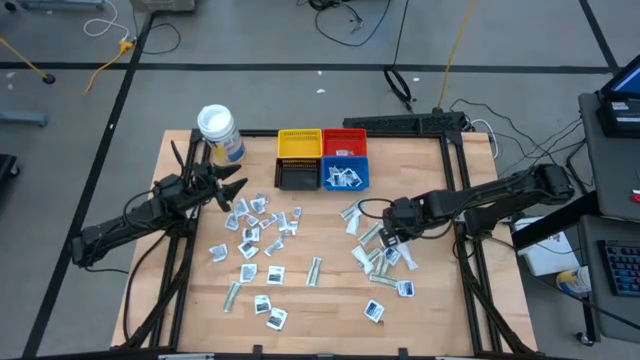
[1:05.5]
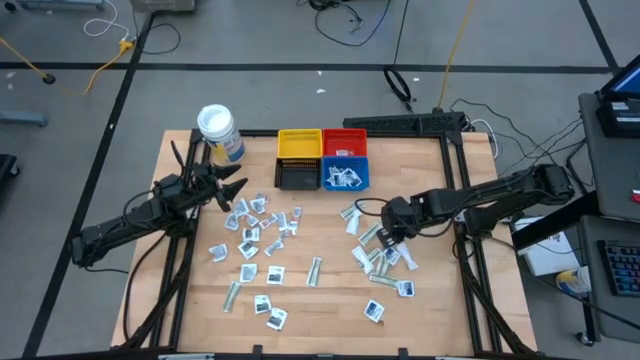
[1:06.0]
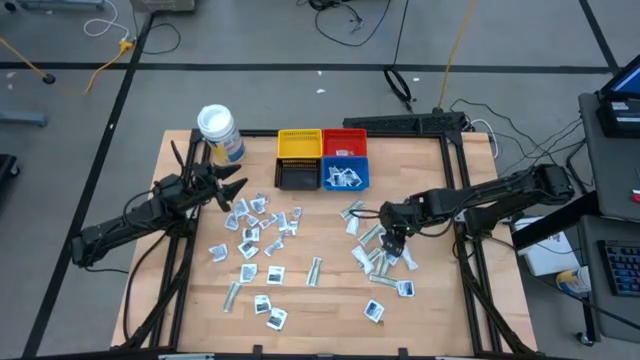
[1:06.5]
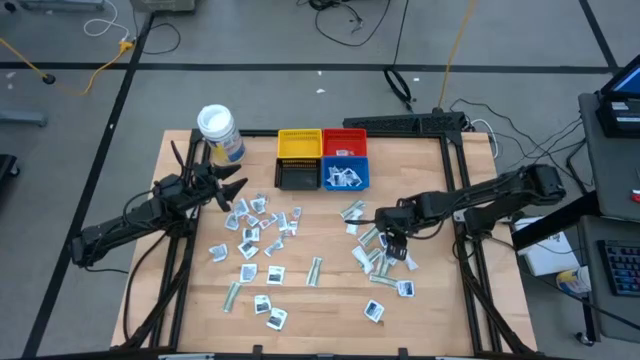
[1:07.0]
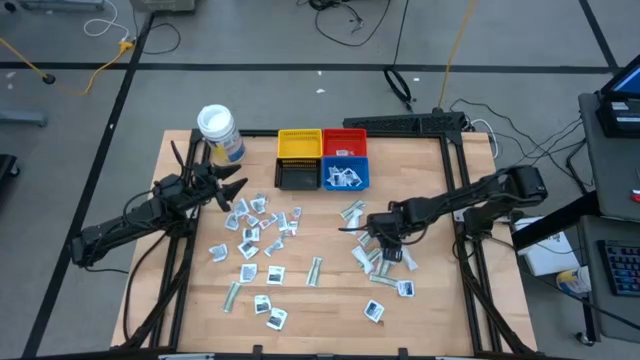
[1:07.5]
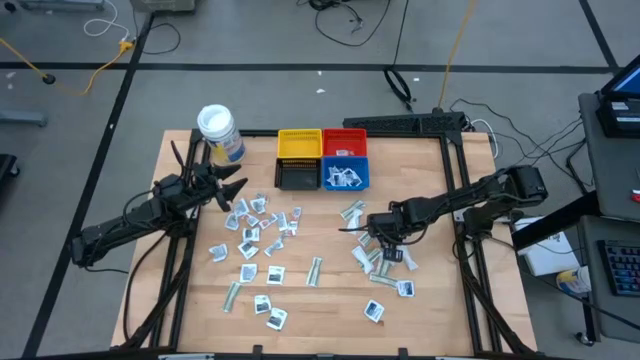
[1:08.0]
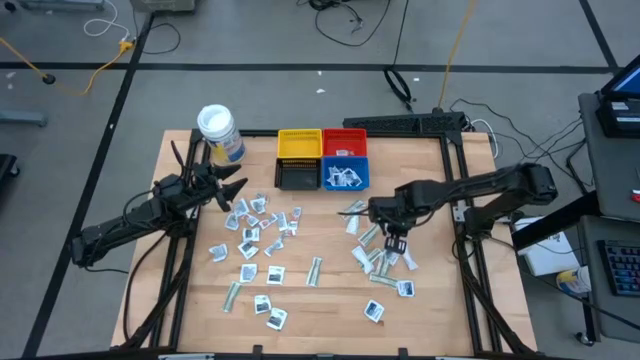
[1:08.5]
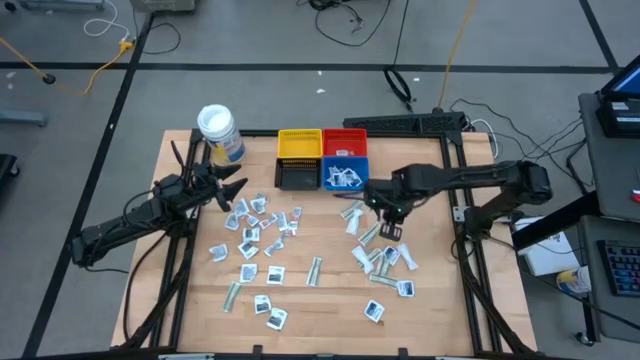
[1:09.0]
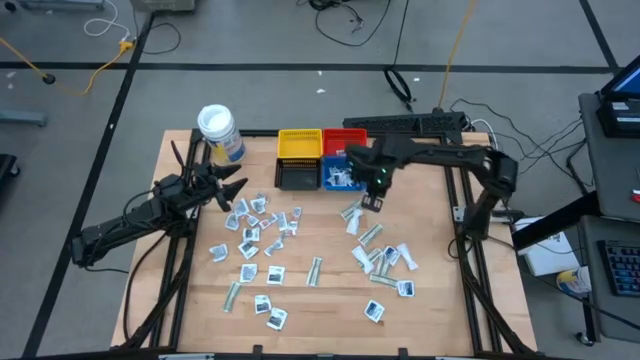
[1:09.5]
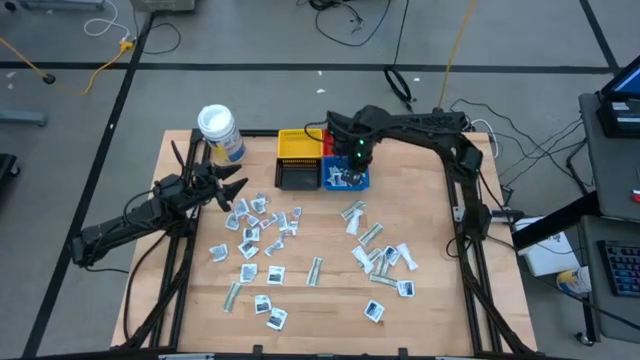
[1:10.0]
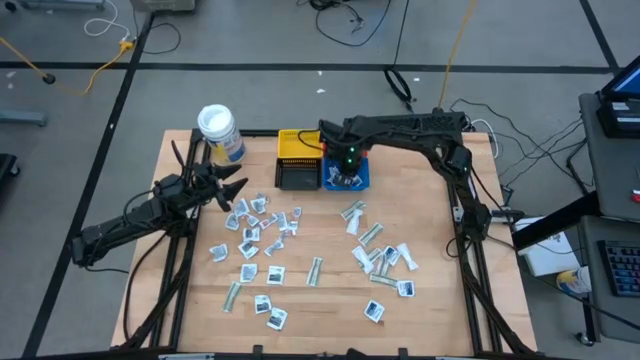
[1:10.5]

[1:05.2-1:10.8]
Task: Pick & Place First Aid Supplies
Put the blue alcohol pad into the blue basket

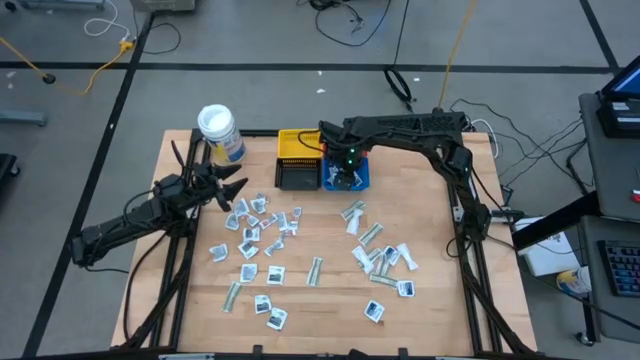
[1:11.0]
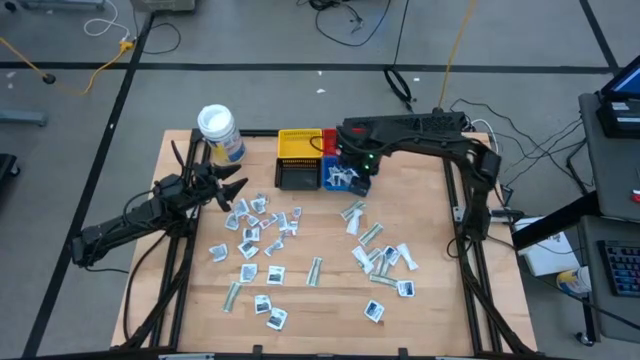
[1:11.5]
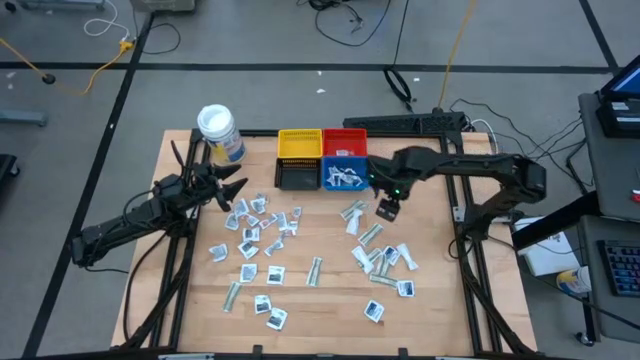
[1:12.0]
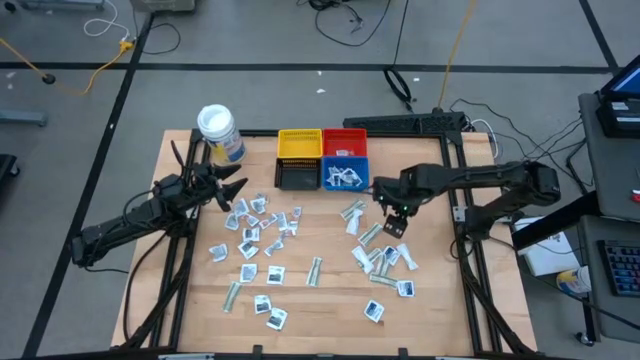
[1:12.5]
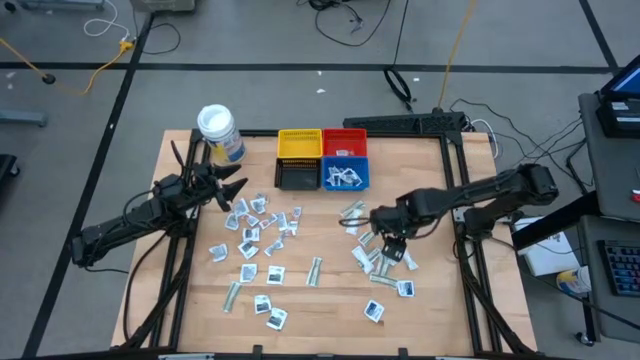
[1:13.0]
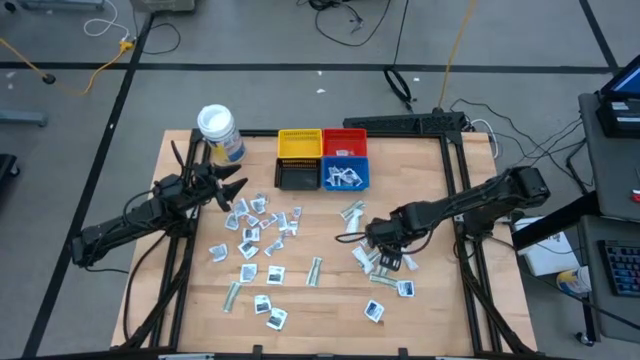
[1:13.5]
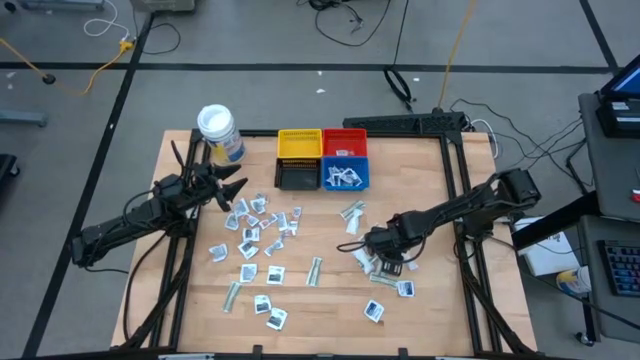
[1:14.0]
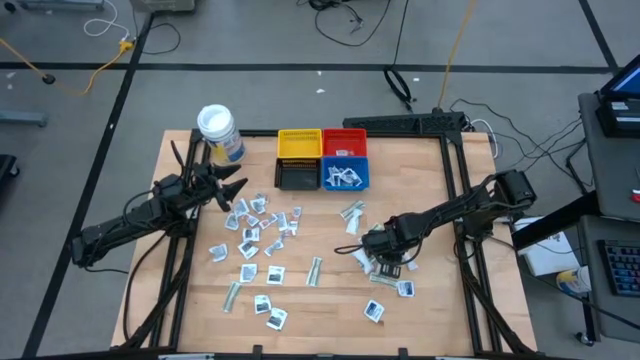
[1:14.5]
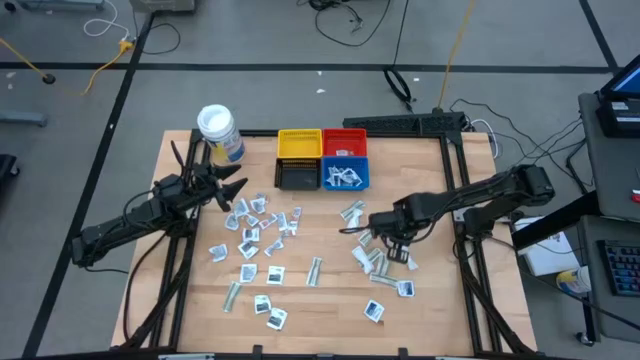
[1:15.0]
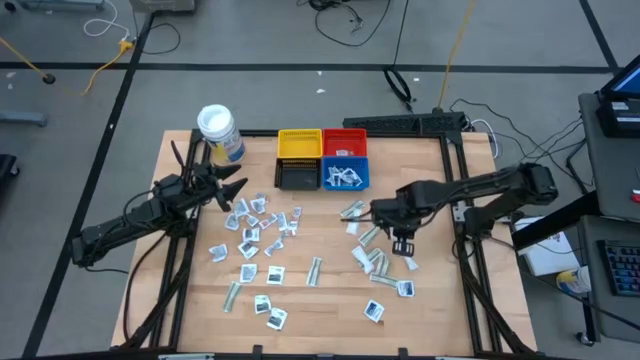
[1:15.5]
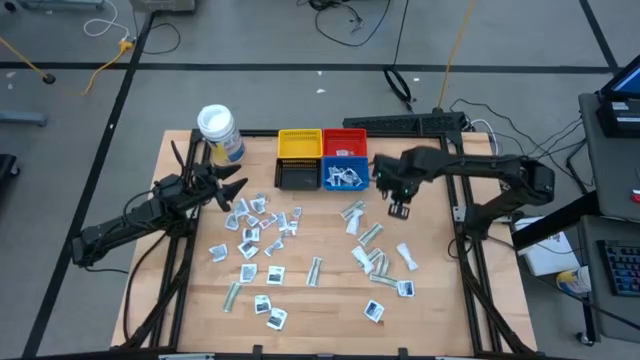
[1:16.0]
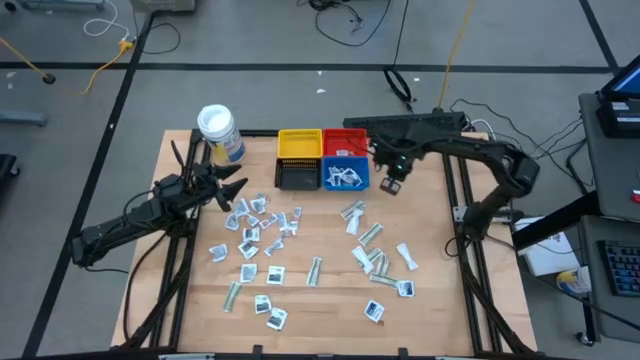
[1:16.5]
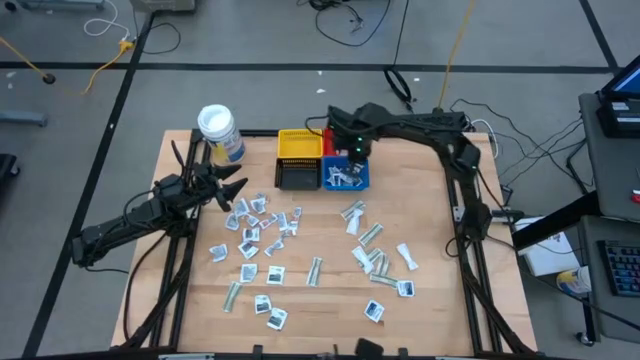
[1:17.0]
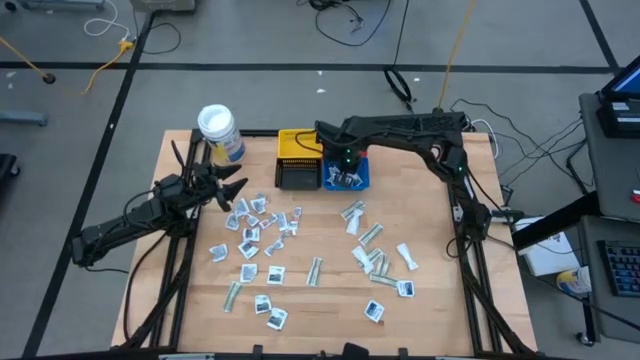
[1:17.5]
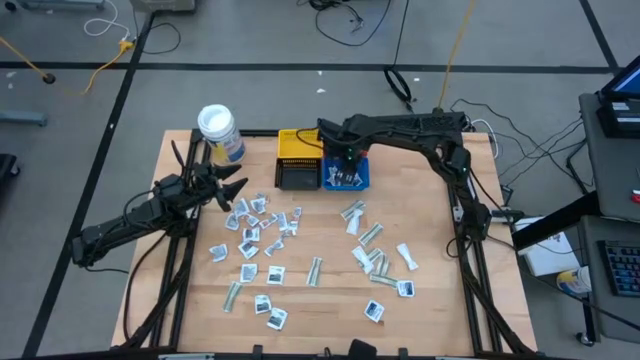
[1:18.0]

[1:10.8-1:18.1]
Put the blue alcohol pad into the blue basket

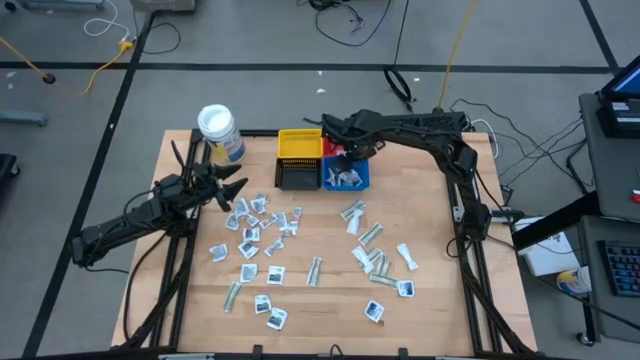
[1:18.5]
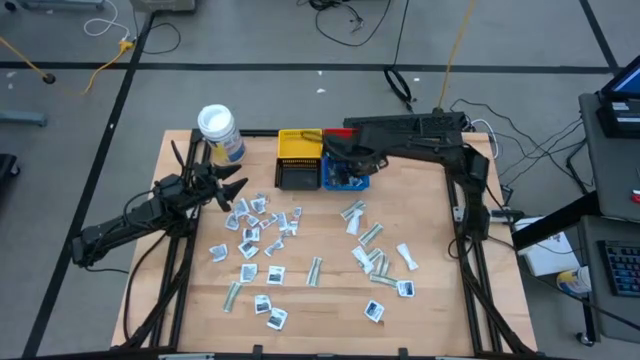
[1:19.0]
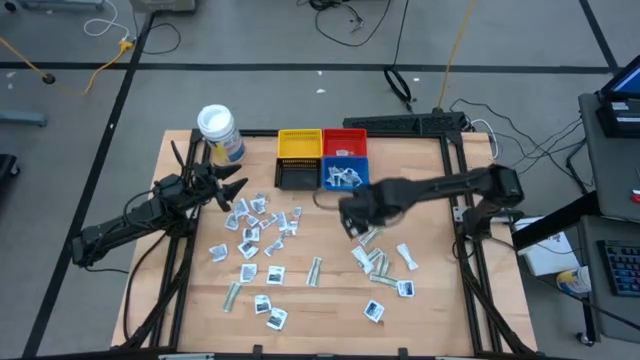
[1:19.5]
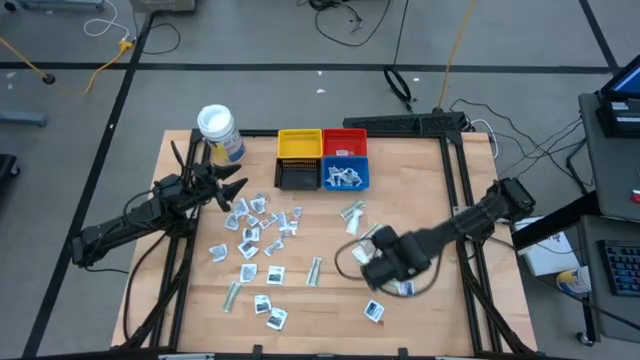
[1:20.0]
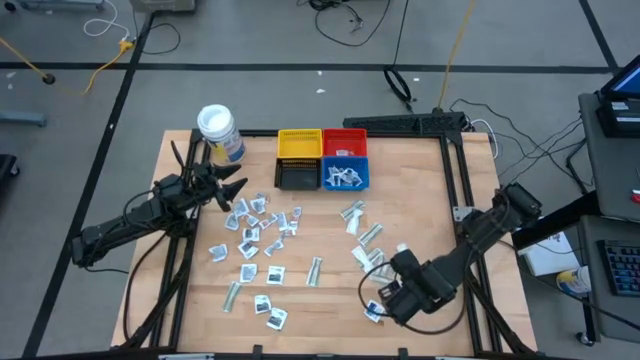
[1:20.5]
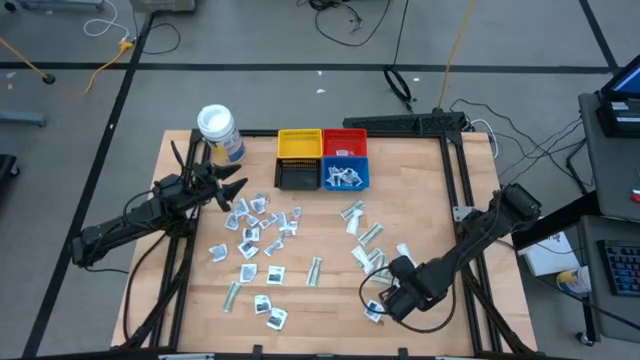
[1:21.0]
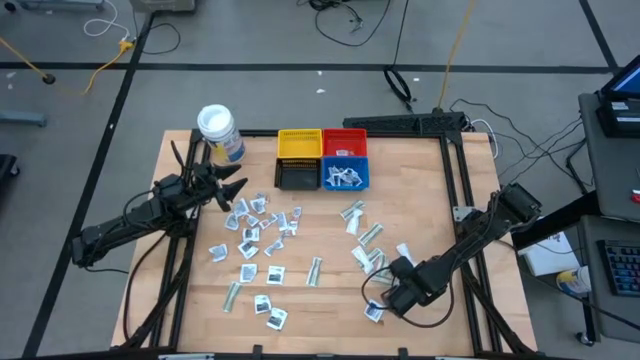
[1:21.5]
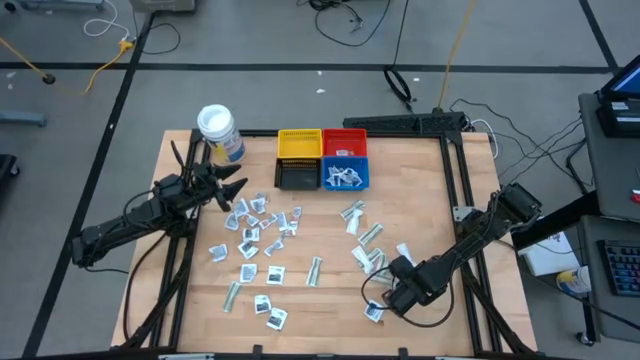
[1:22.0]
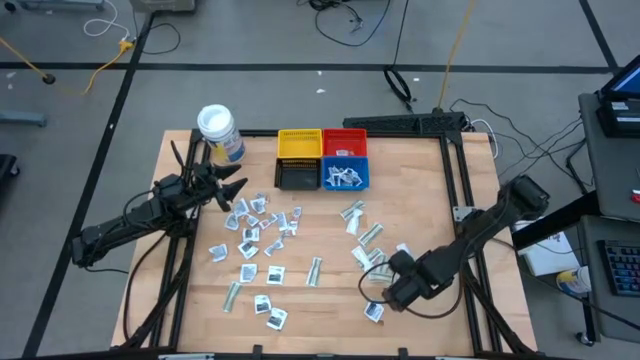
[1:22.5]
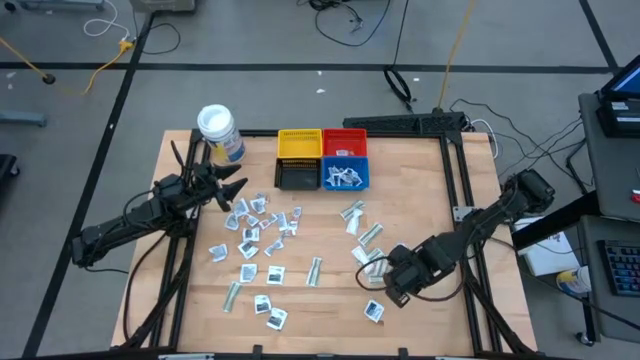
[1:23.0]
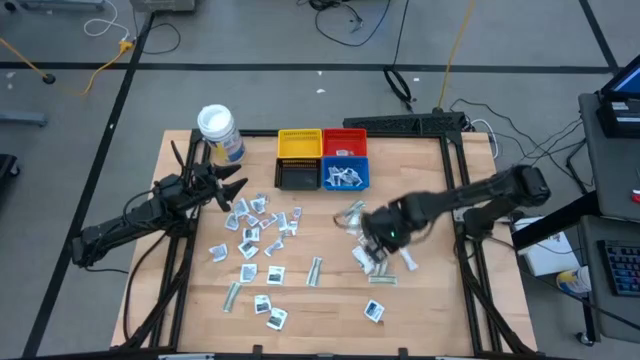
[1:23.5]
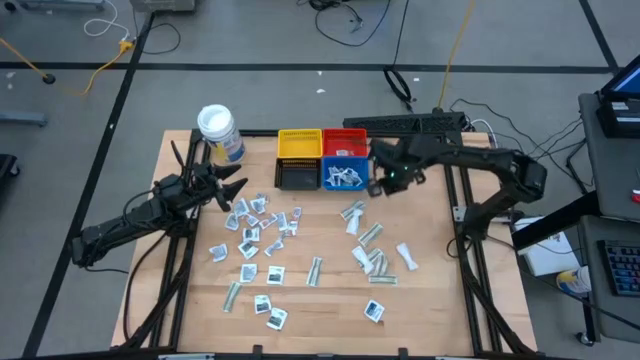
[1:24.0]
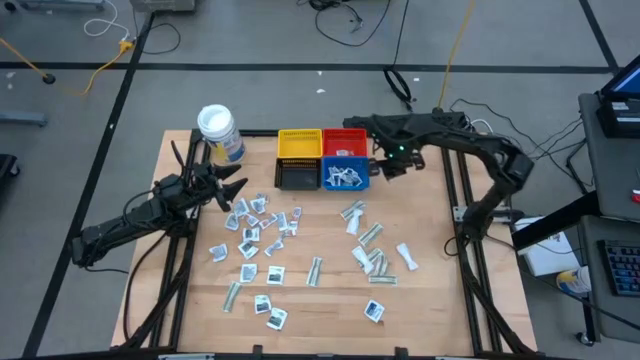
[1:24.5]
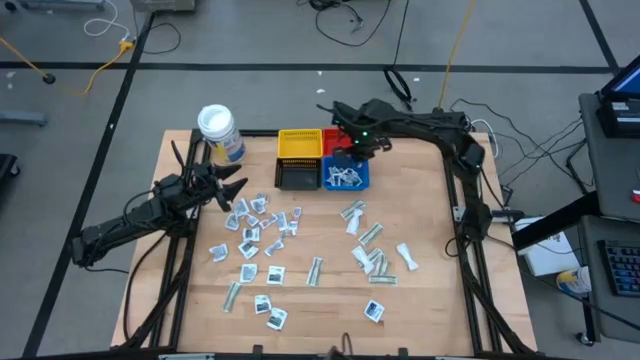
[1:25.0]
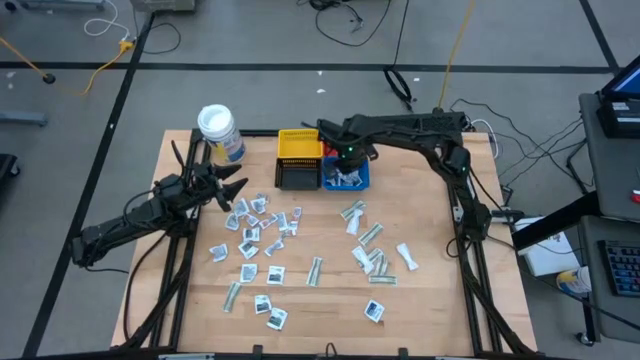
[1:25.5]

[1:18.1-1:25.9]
Put the blue alcohol pad into the blue basket

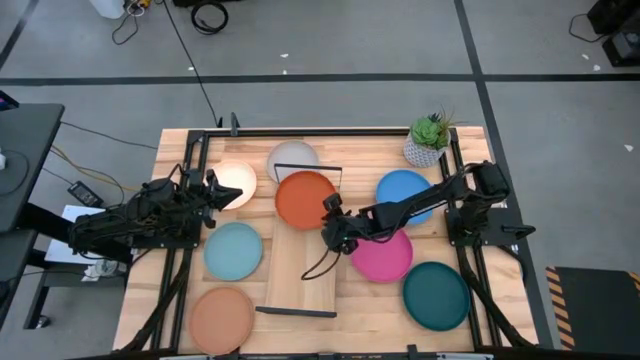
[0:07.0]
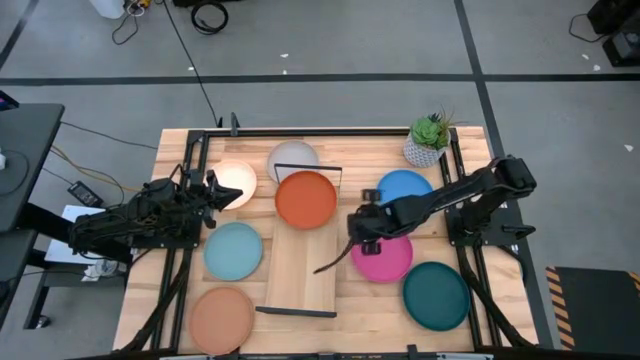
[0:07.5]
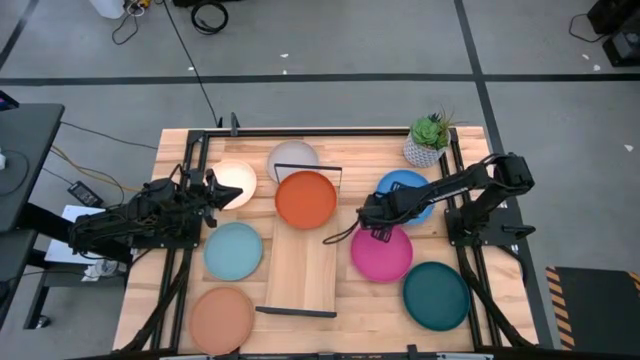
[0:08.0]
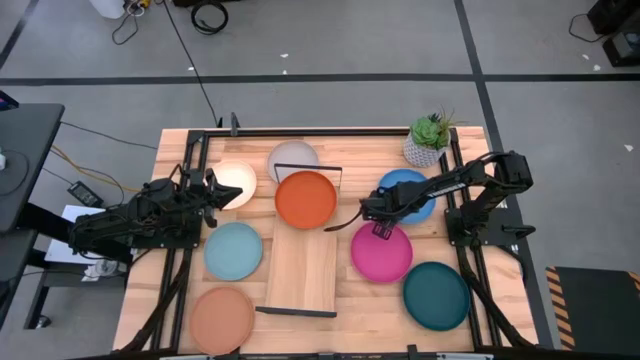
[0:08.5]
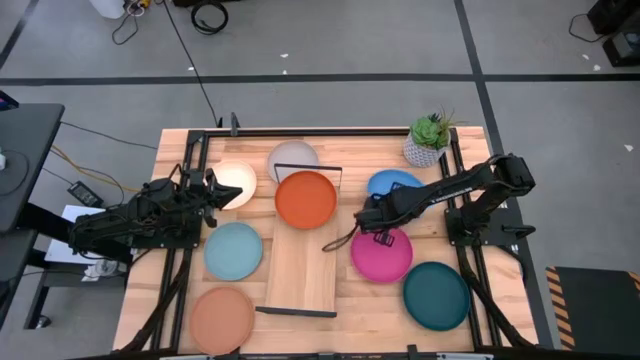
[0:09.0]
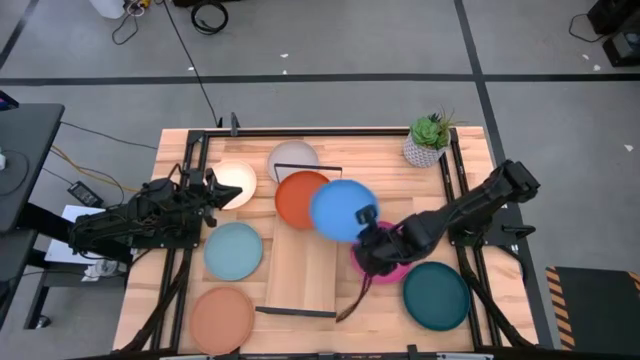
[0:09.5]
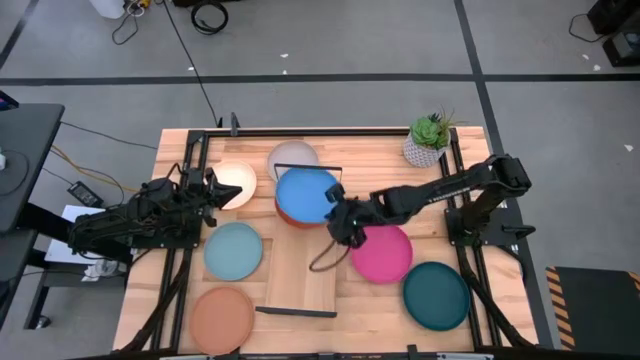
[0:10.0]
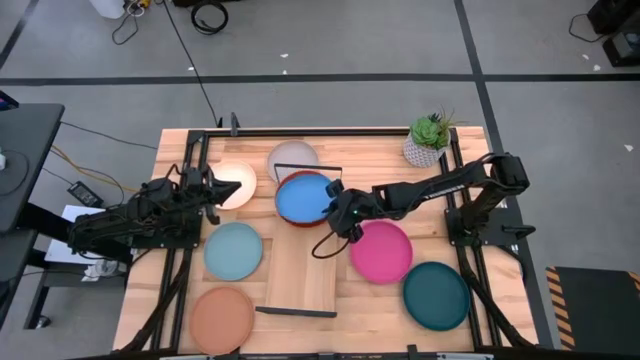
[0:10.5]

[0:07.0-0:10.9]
Task: Place and stack plates onto a shelf
Stack the blue plate on top of the orange plate on the shelf
